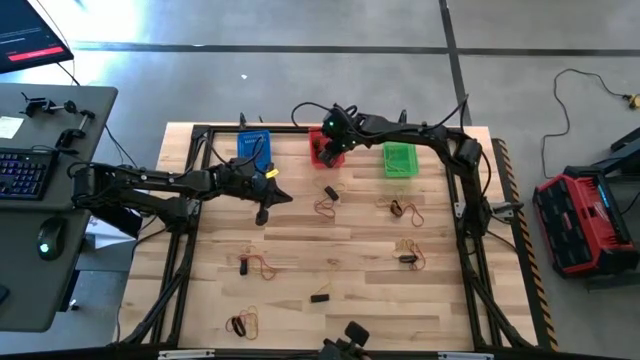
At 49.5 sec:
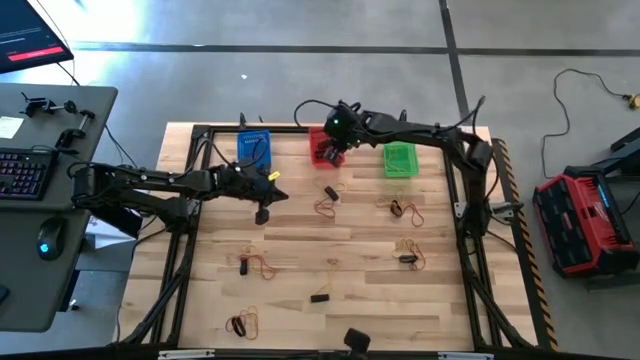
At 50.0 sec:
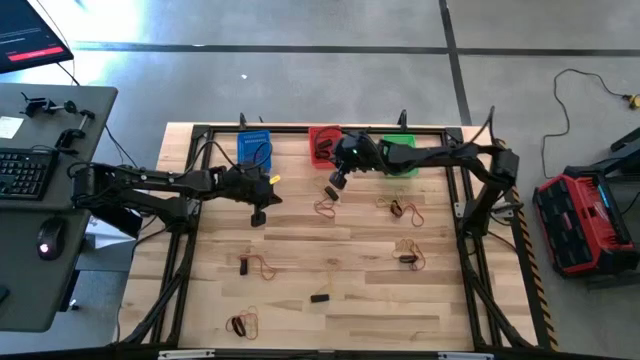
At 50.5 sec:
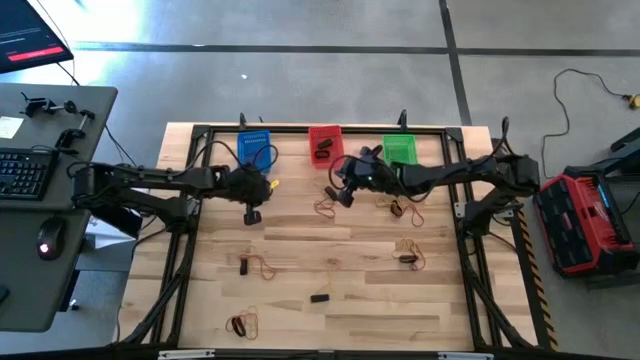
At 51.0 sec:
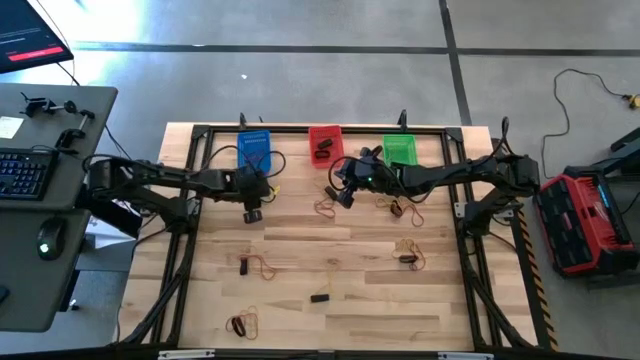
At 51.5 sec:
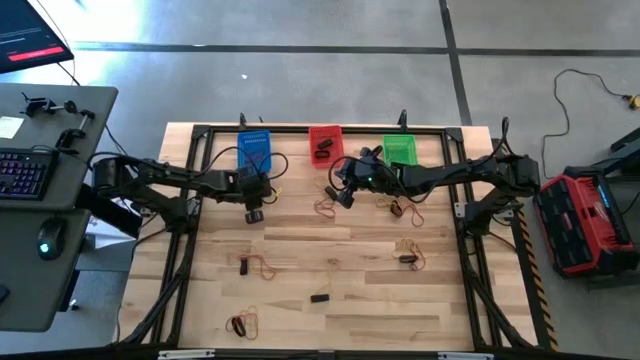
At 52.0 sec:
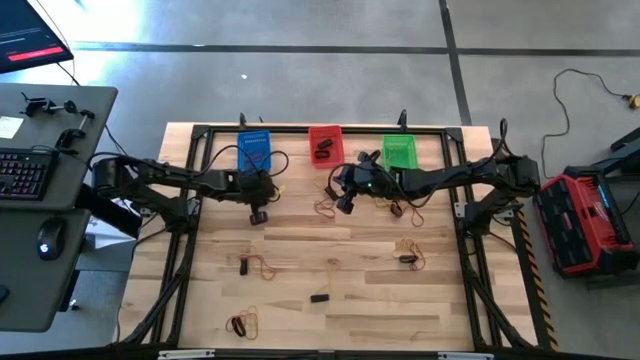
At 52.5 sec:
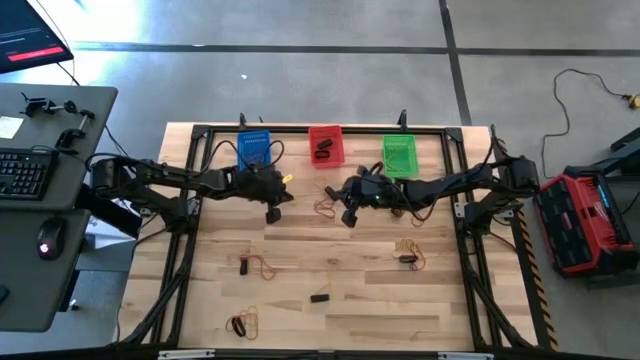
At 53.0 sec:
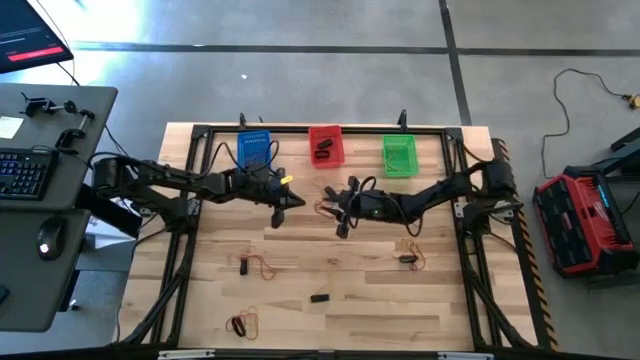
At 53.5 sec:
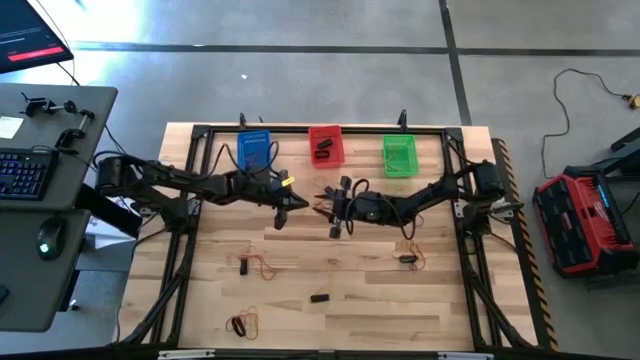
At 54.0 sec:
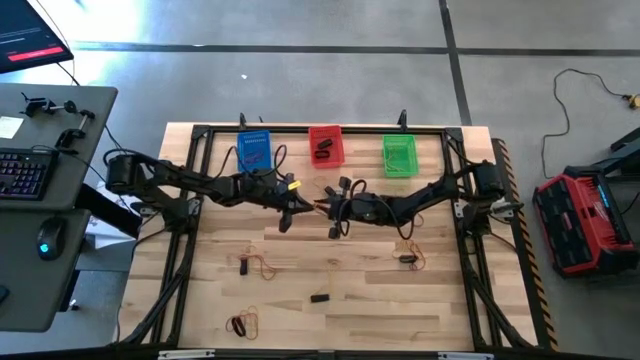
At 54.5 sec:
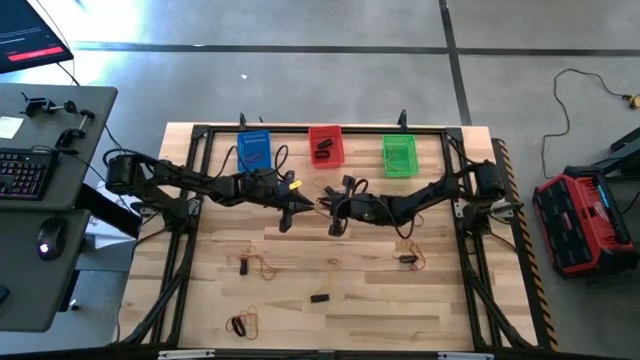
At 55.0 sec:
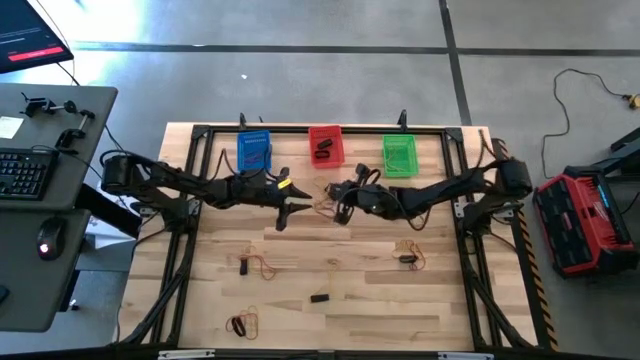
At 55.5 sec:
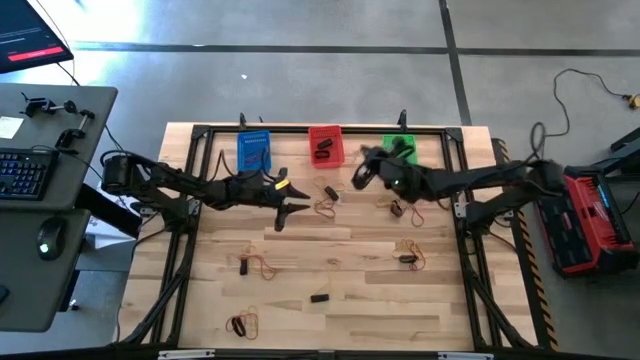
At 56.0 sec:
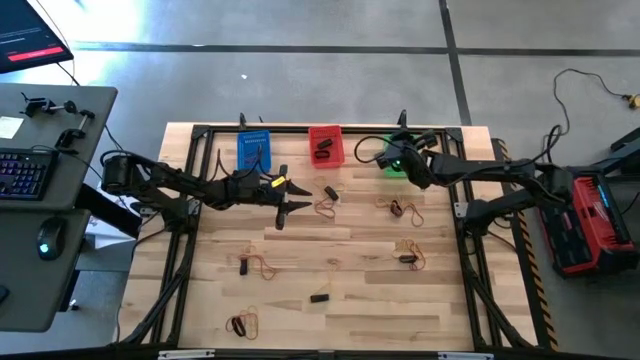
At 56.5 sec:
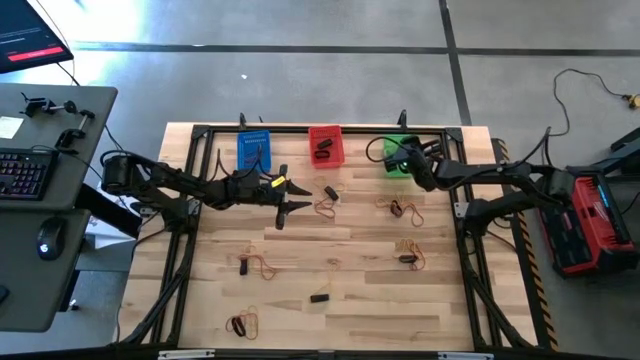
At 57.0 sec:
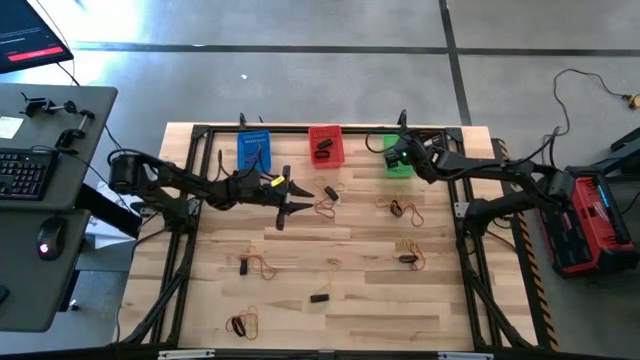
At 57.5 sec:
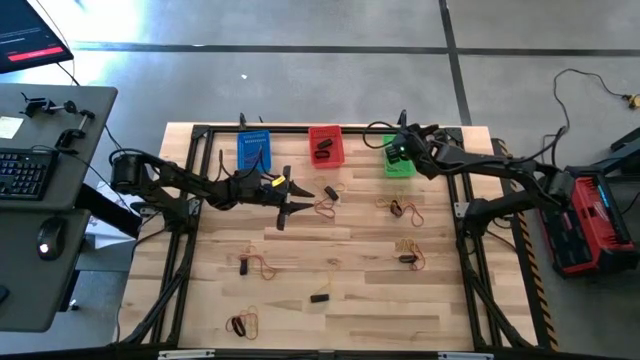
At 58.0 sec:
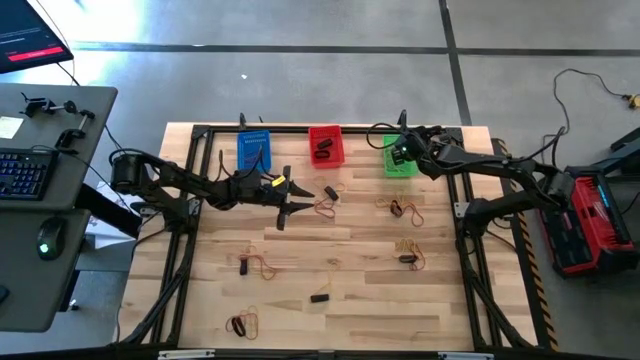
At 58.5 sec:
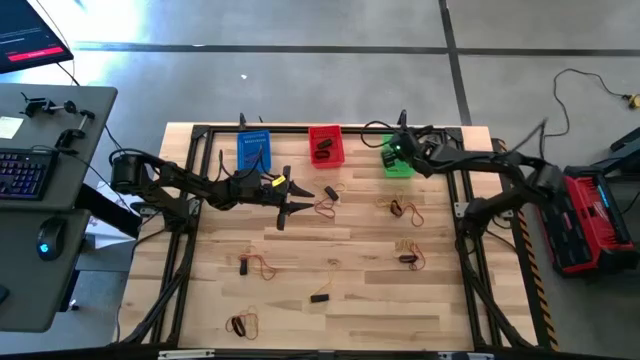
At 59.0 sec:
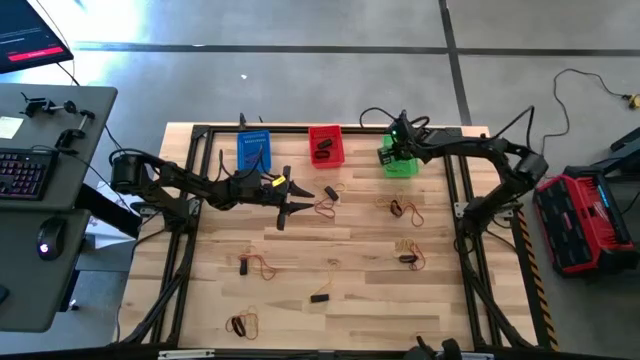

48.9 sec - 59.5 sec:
Task: Sort rubber bands into baskets
Put the yellow rubber band into the green bin

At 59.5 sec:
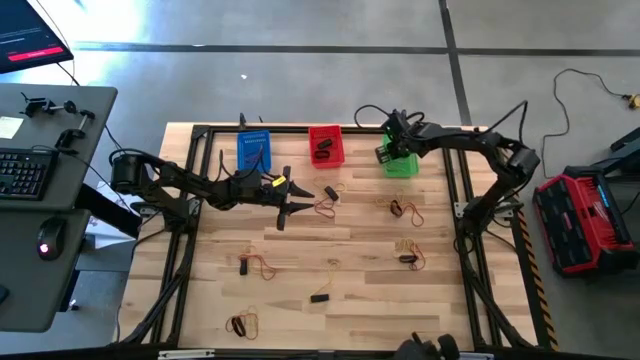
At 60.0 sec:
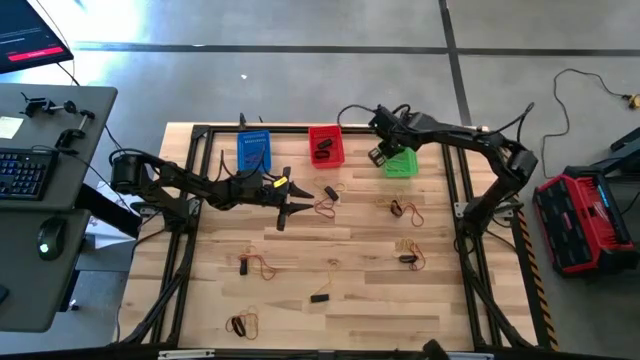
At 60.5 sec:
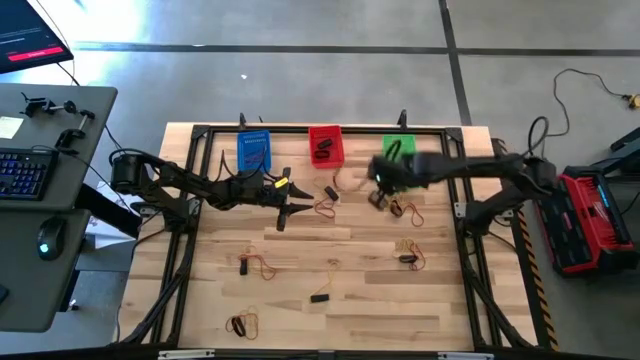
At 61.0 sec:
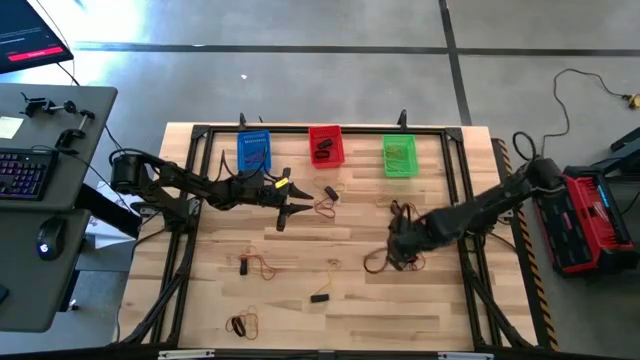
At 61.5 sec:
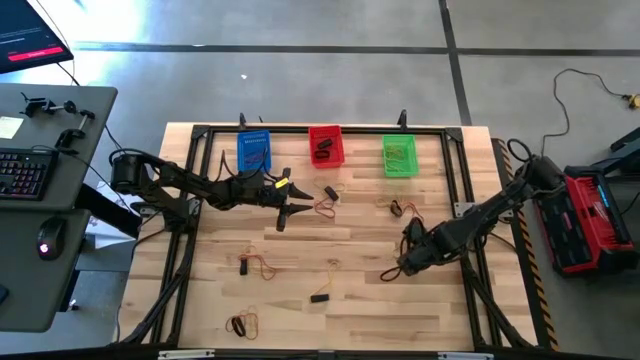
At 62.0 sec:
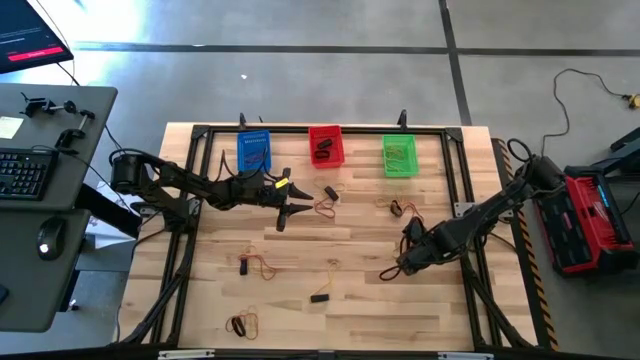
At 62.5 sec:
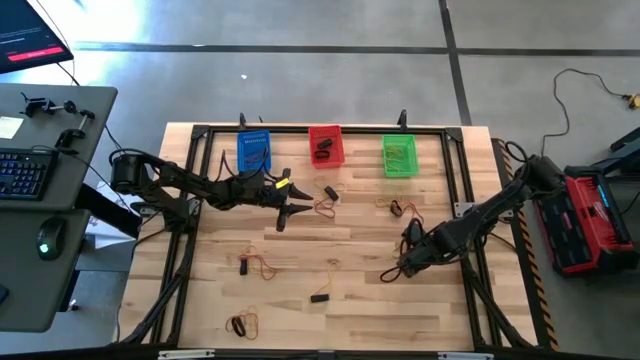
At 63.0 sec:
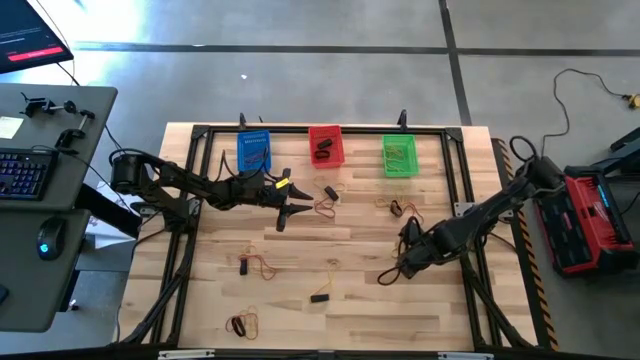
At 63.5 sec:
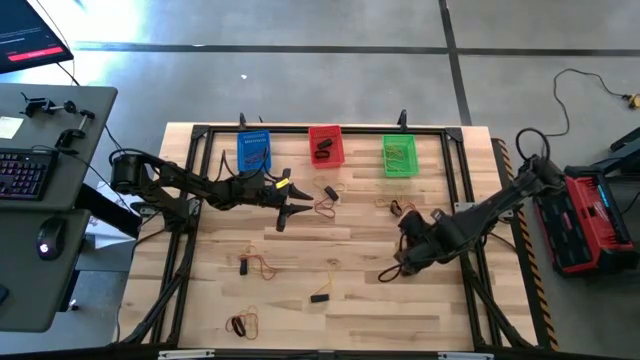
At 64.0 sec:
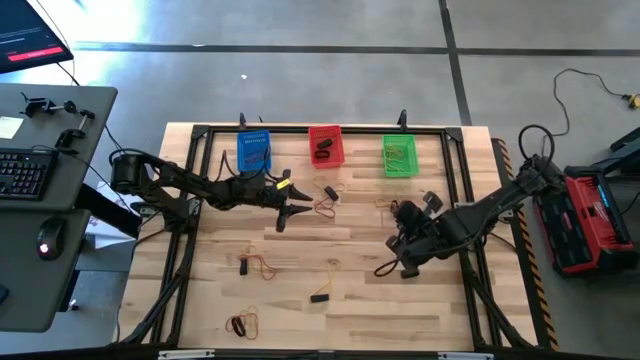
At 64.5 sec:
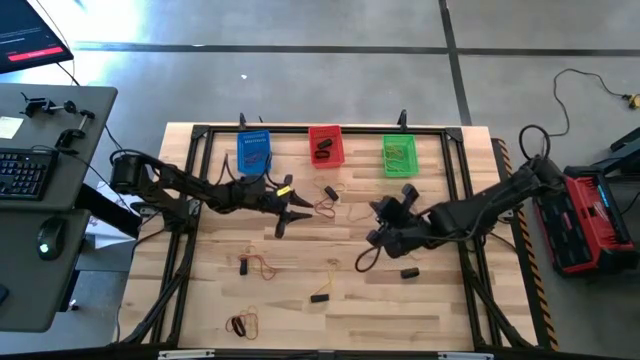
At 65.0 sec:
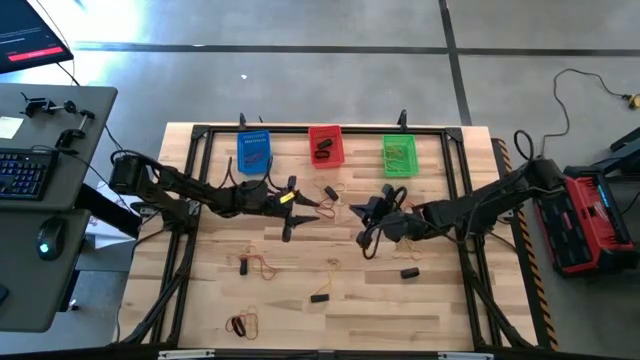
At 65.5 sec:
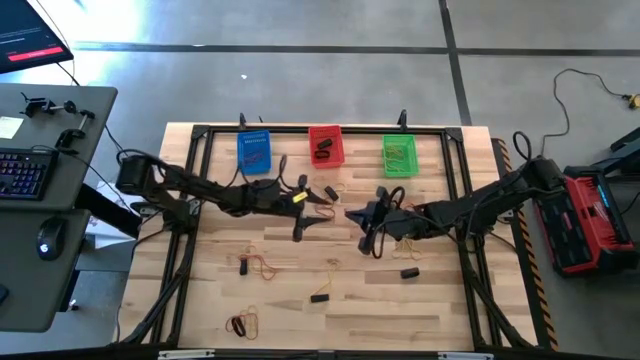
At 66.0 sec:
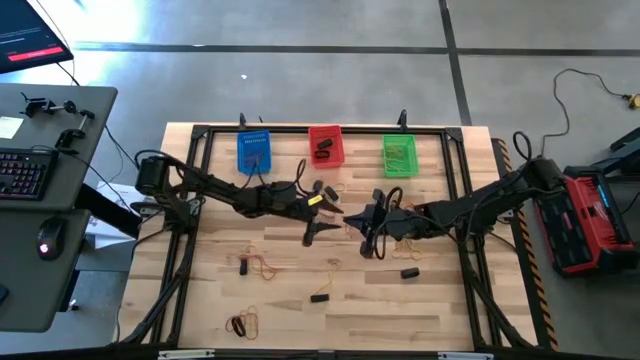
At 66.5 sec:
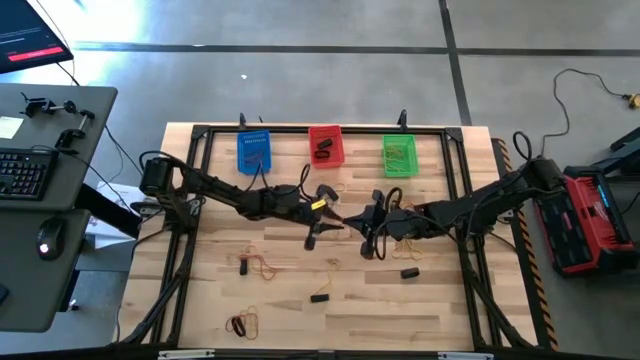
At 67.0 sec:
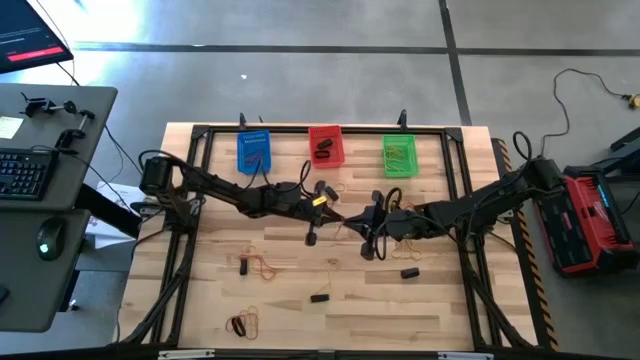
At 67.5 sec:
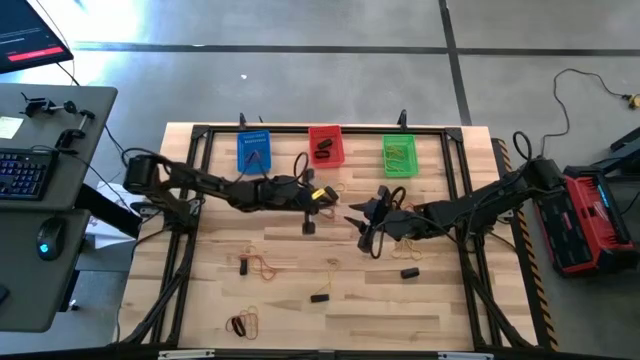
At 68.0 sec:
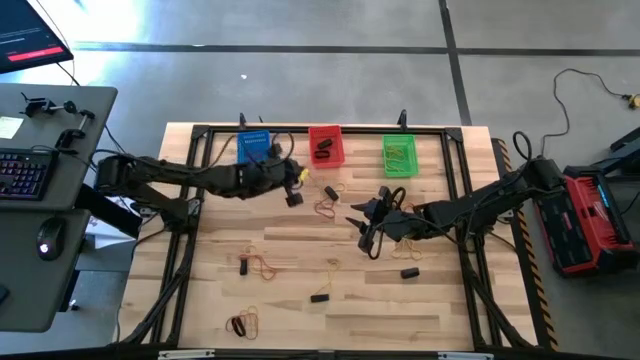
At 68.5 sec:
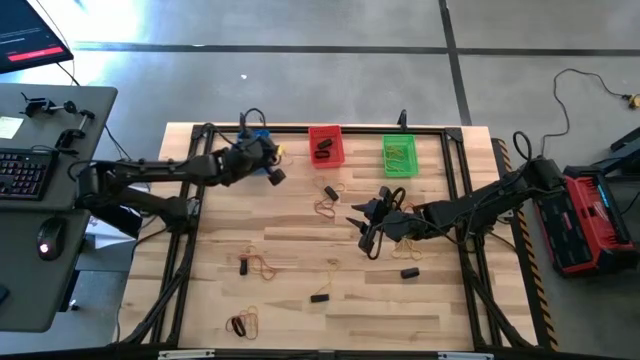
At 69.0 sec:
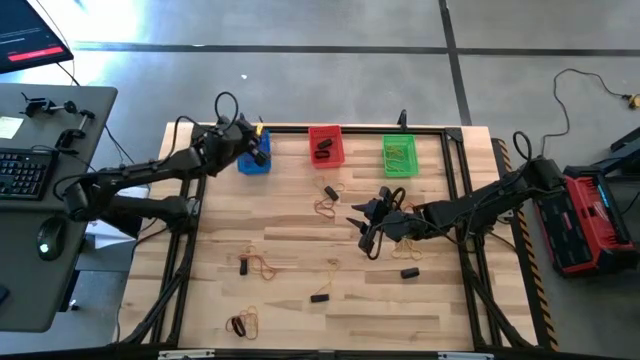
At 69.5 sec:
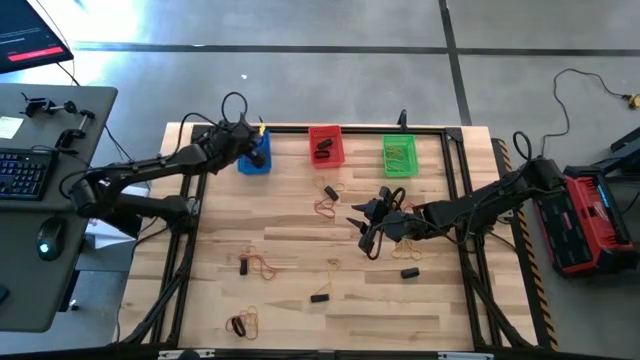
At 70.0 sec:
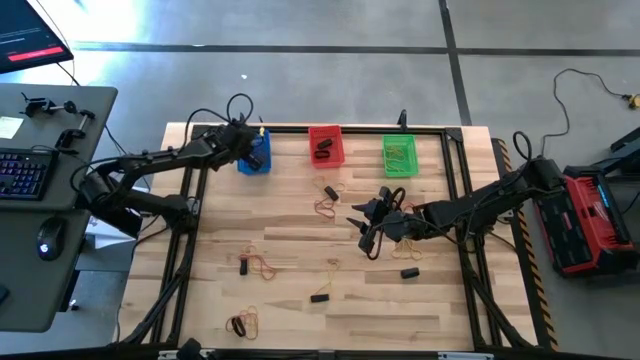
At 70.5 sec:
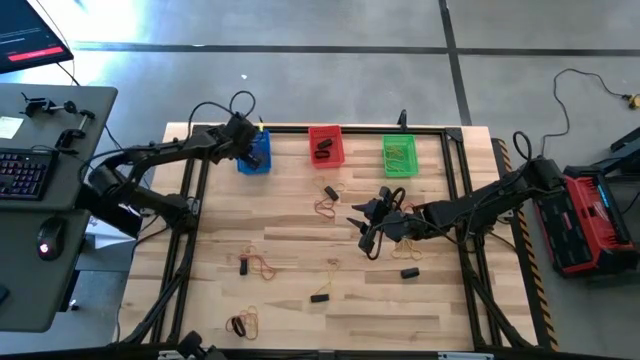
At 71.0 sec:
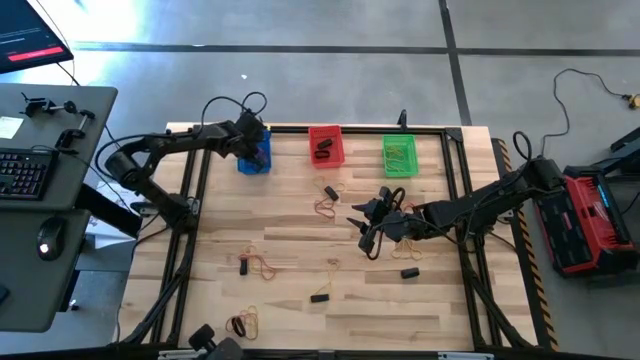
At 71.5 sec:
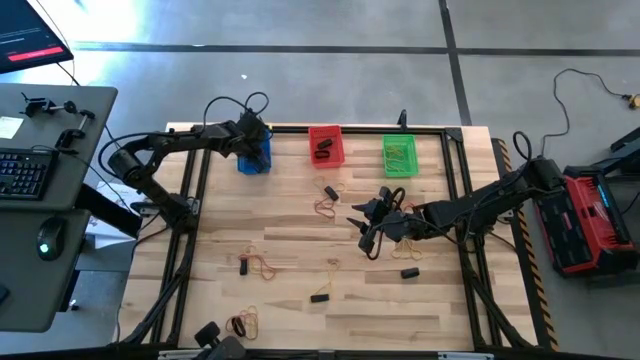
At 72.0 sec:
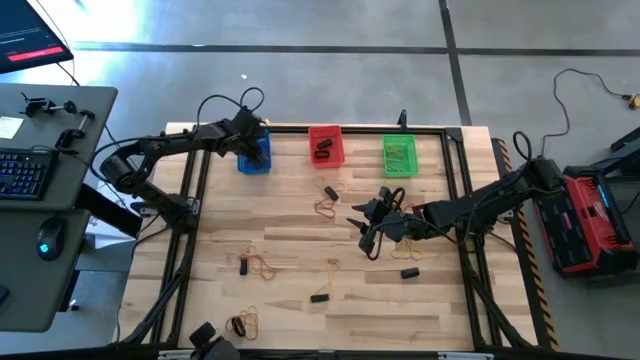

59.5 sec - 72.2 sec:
Put the red rubber band into the blue bin
